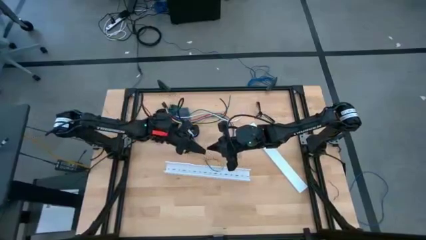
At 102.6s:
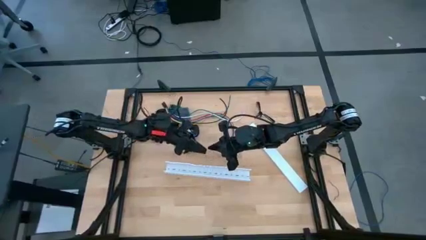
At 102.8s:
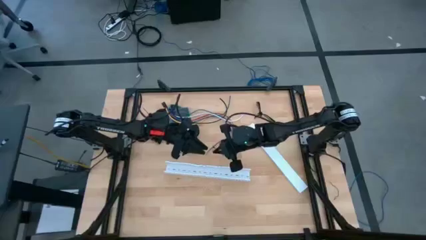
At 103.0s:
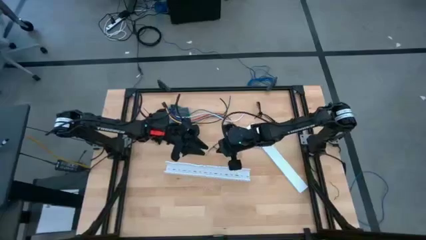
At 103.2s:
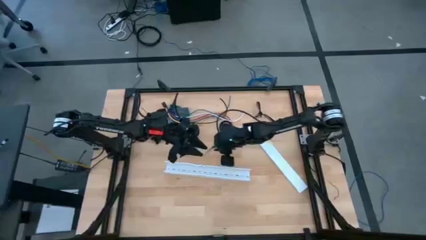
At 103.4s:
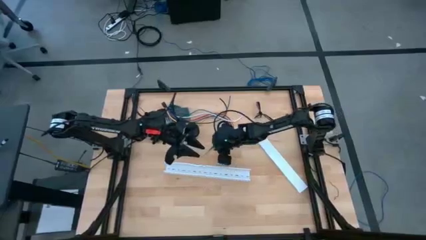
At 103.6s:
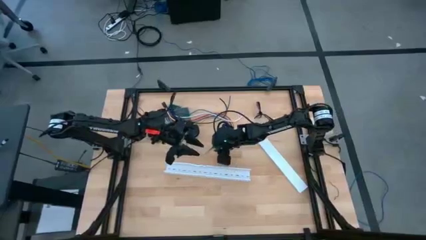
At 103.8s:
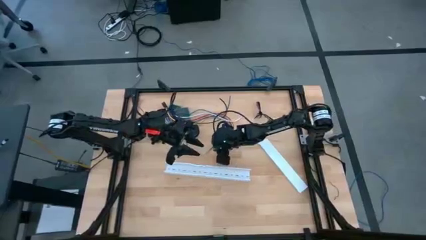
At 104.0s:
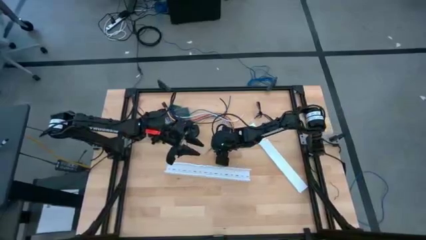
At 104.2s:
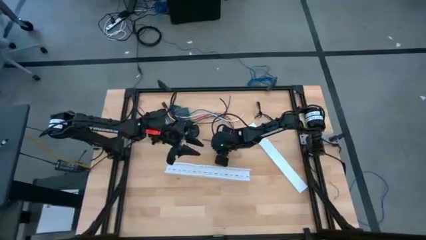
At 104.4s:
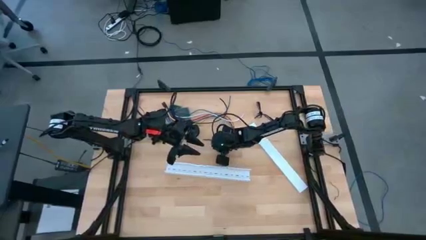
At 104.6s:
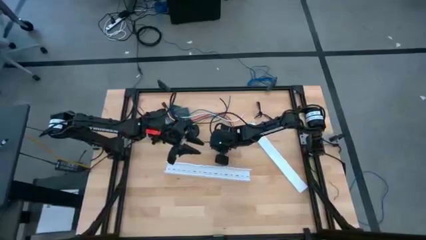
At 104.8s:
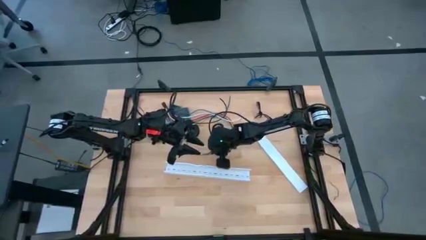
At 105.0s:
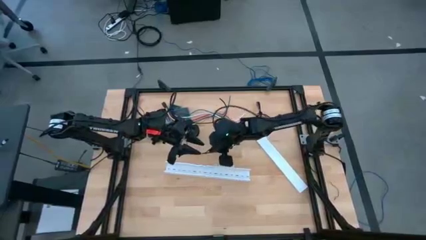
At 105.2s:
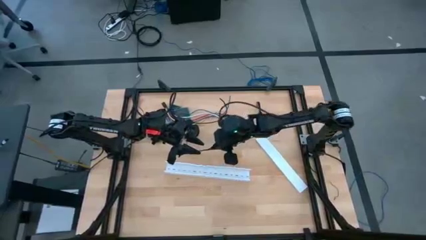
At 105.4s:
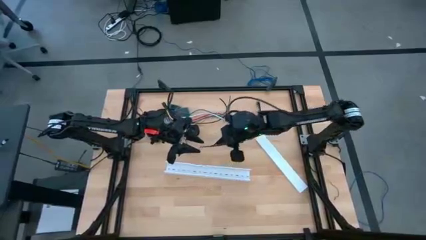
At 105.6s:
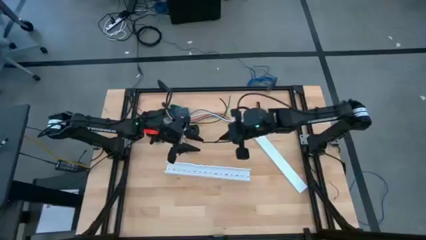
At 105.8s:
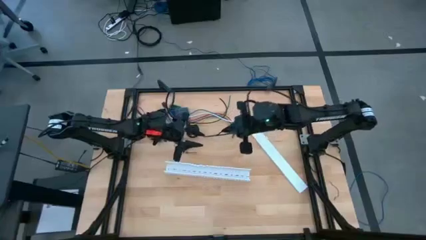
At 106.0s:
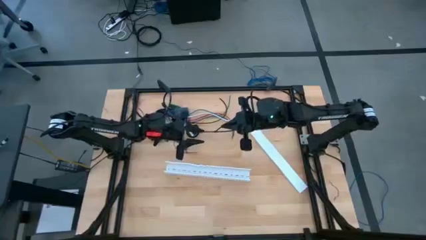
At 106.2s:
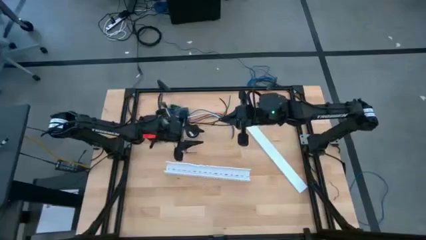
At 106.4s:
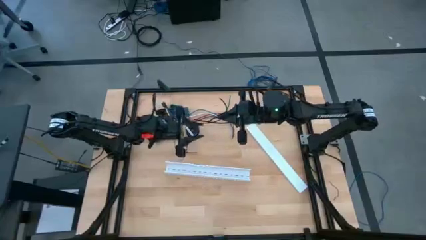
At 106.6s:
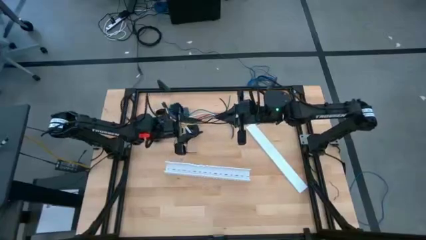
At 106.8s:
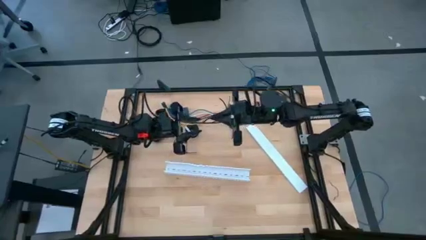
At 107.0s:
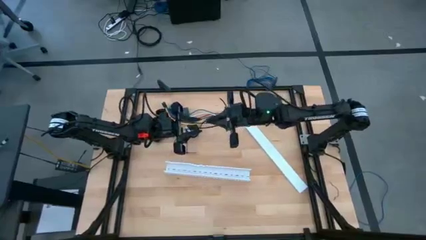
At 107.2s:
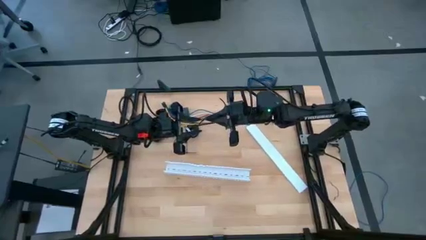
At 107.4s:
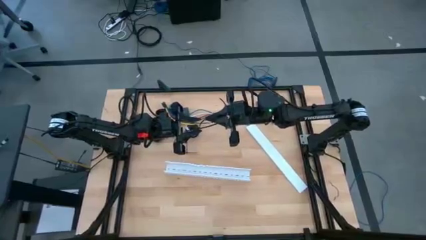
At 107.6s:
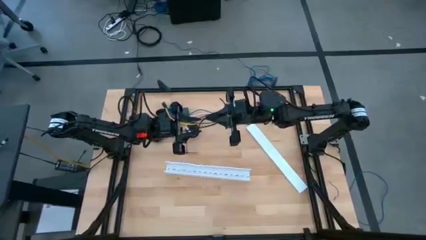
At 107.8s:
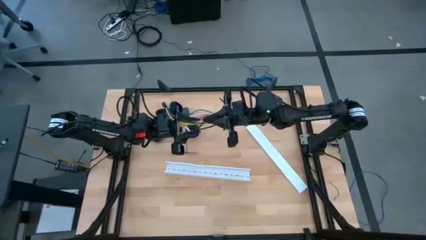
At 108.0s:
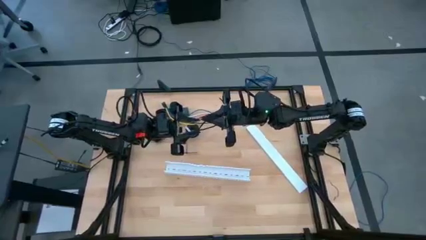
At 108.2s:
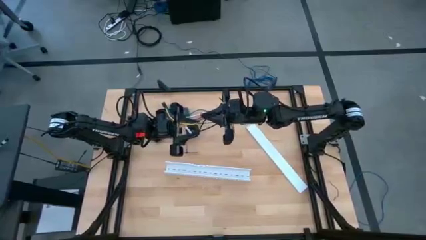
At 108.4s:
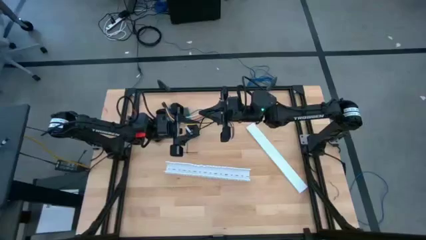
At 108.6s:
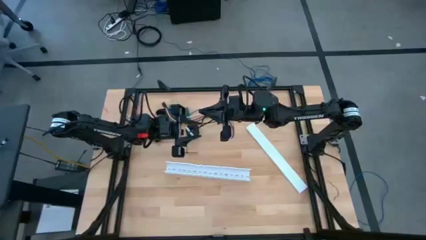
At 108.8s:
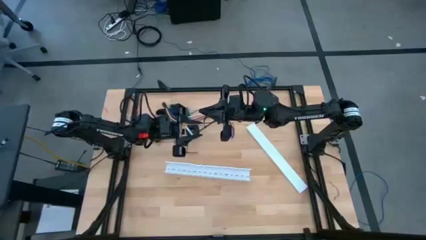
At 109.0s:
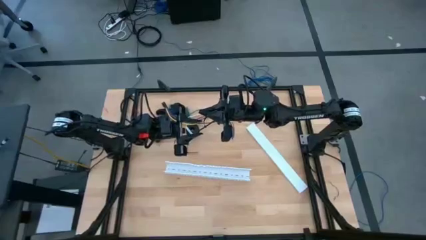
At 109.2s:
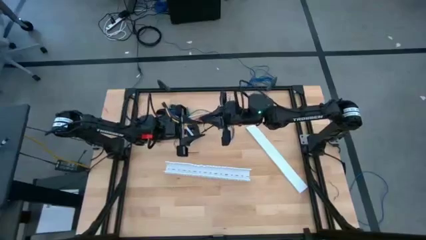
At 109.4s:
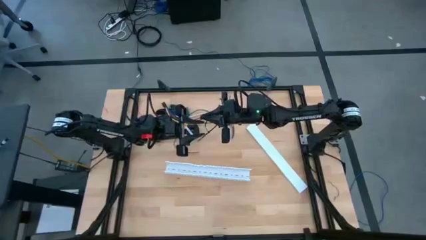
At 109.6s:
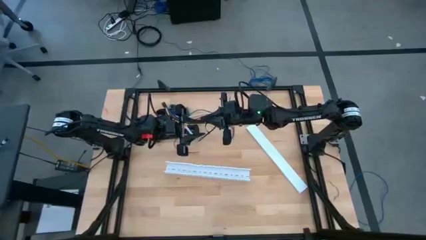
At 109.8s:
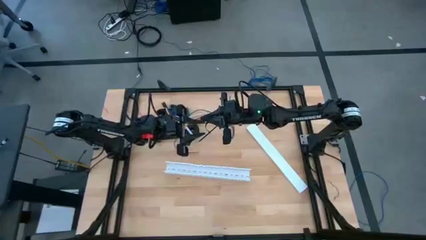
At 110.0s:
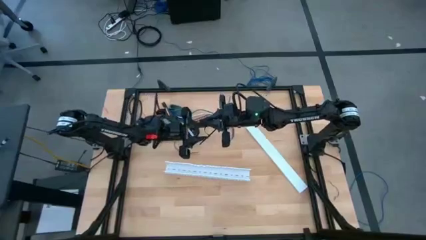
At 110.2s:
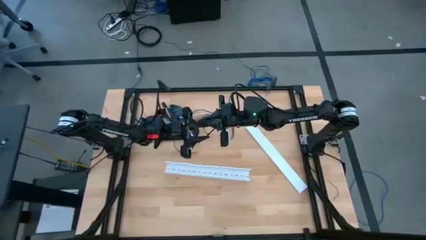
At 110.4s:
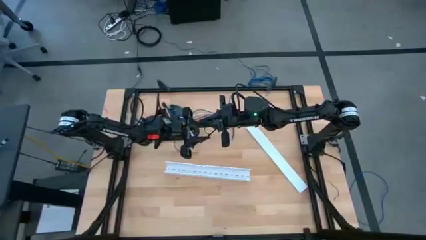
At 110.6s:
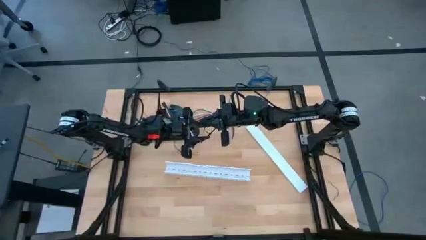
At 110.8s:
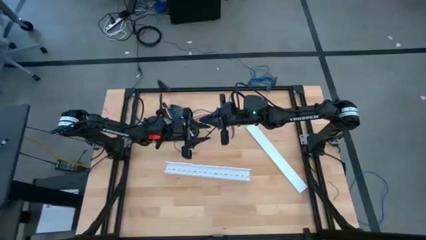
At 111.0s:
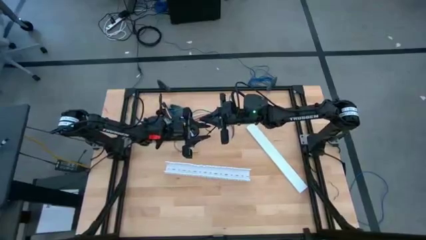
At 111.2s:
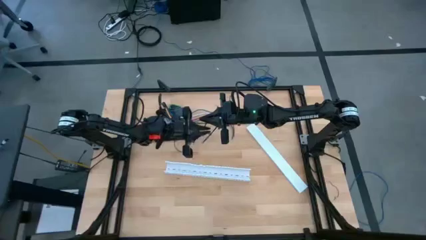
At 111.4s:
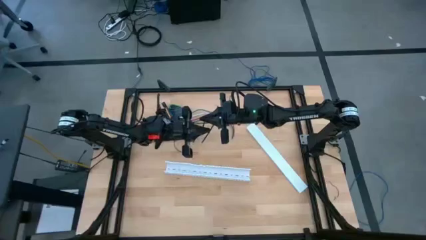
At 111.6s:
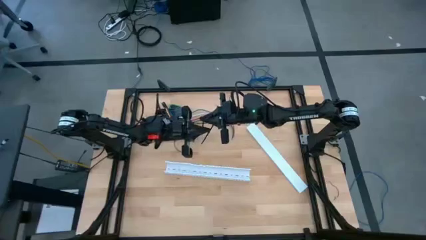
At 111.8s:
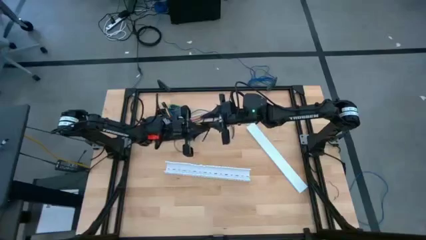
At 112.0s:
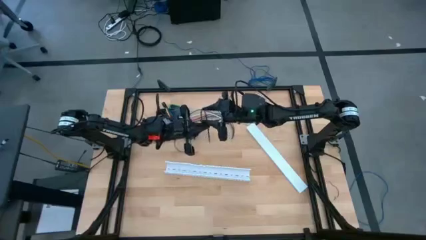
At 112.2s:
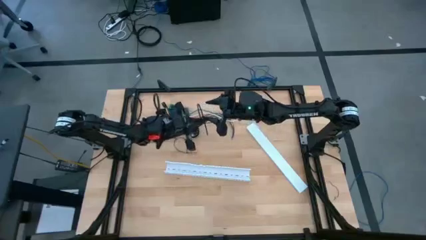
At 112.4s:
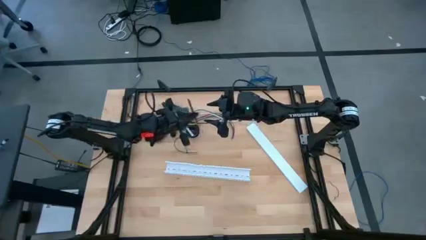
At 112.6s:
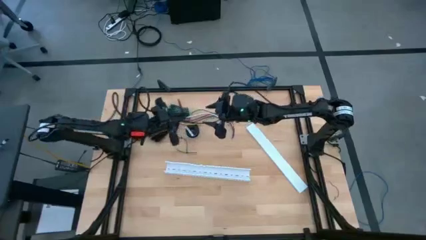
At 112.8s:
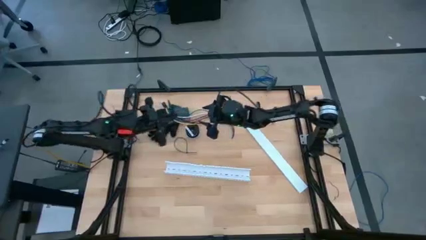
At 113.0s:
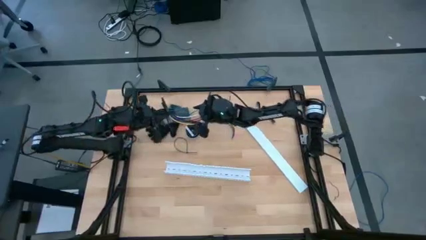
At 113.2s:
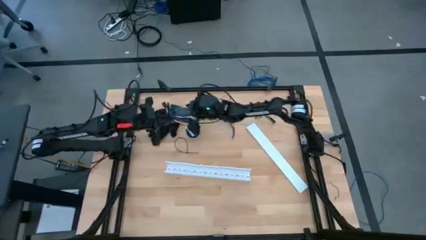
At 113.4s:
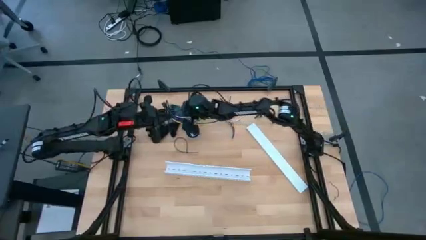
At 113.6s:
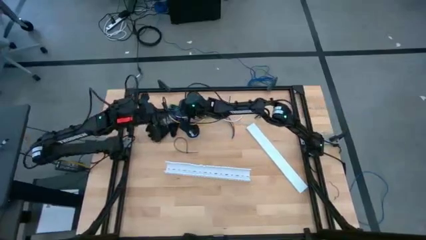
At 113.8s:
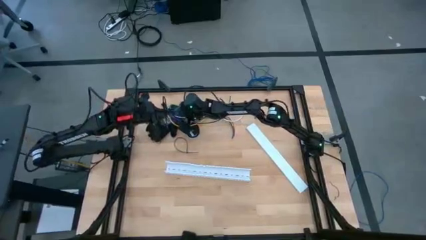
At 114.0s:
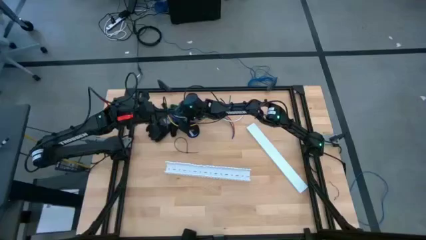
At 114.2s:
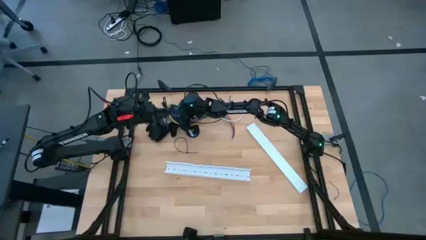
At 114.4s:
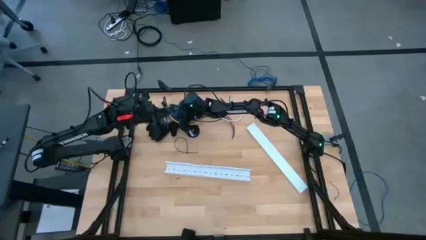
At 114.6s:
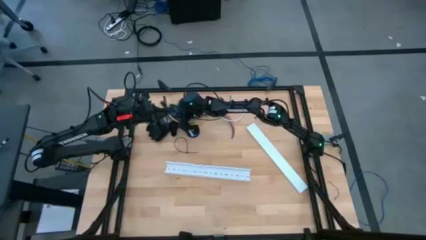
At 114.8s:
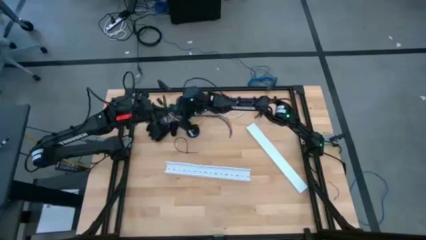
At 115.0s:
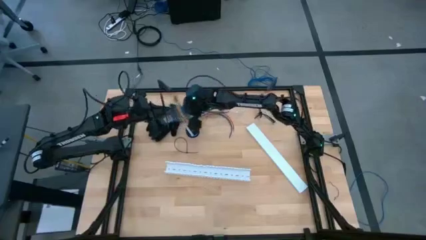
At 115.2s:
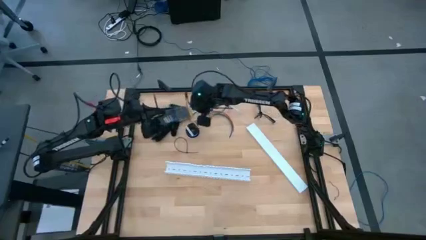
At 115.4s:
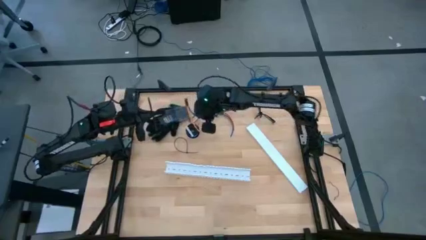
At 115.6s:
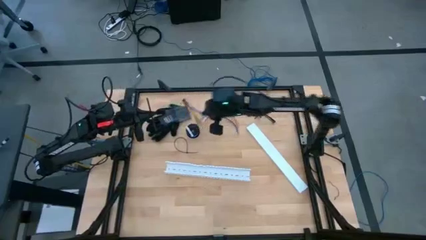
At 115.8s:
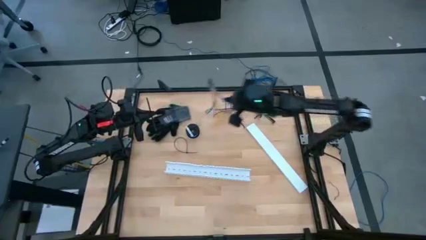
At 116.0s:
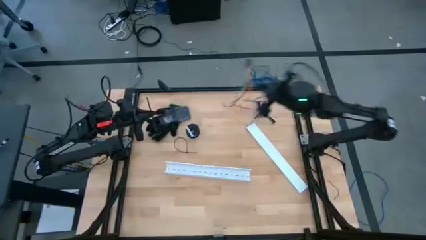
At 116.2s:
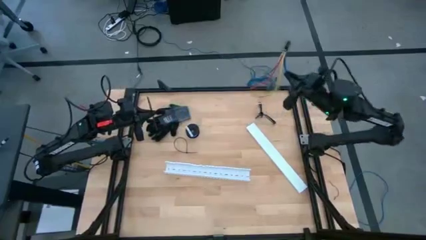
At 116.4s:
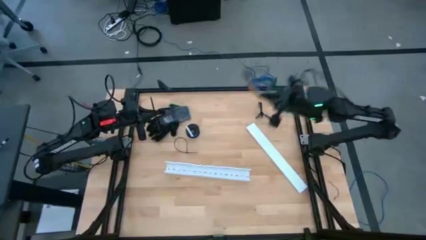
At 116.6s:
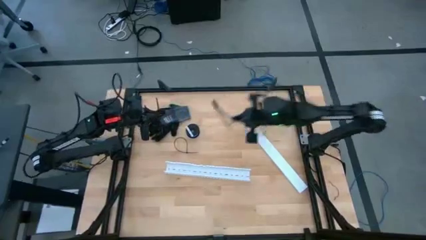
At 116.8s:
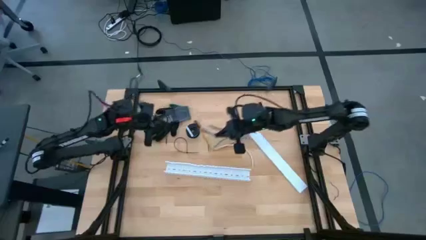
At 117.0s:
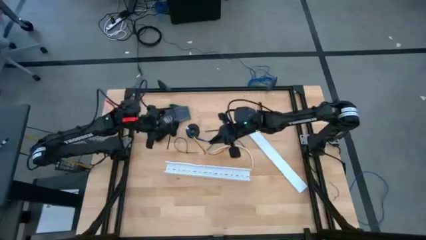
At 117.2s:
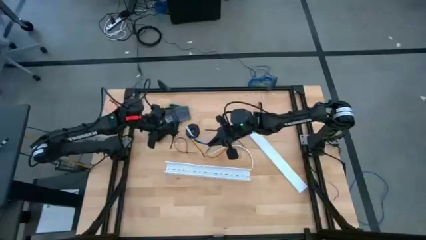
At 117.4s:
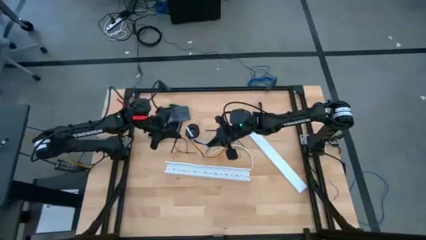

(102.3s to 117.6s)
Task: Ziptie cables
Wrap the cable wires with the black zip tie
